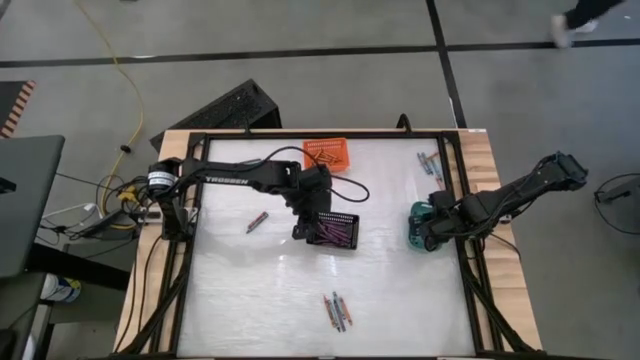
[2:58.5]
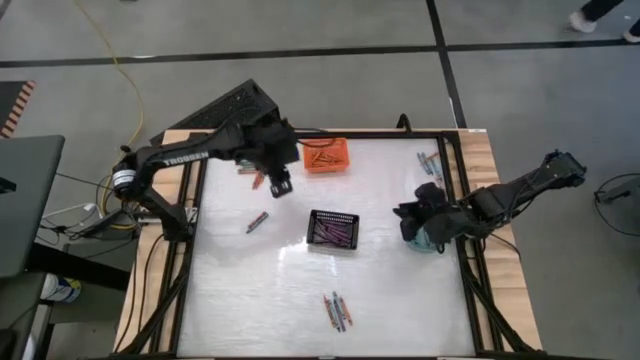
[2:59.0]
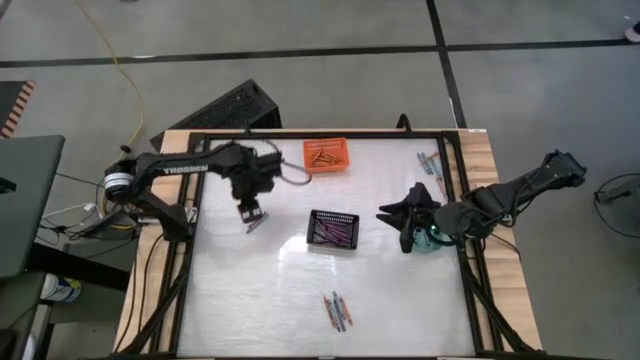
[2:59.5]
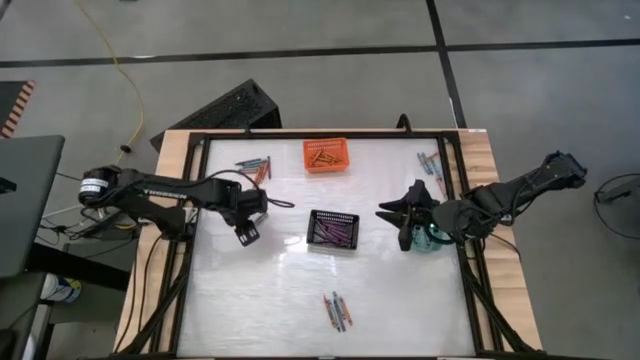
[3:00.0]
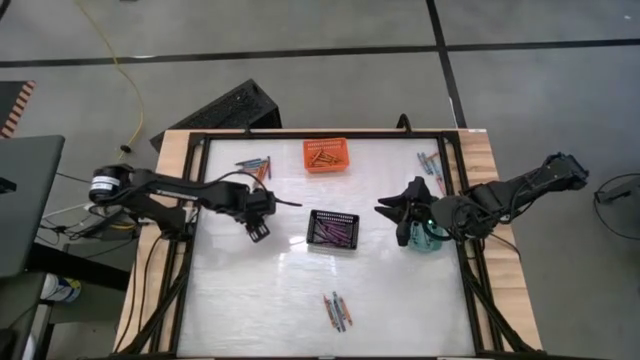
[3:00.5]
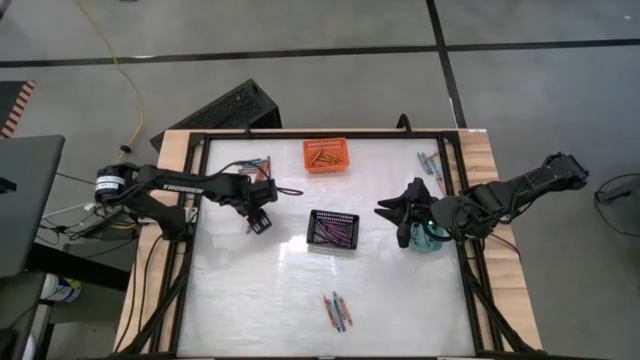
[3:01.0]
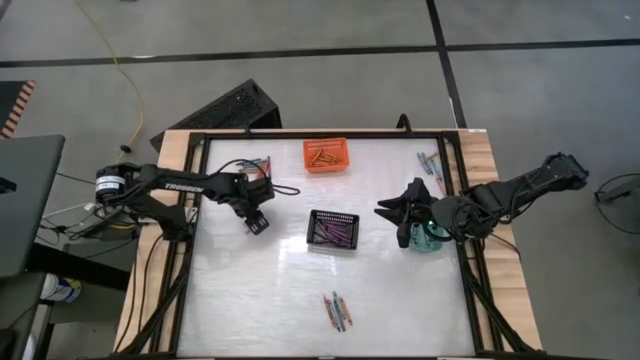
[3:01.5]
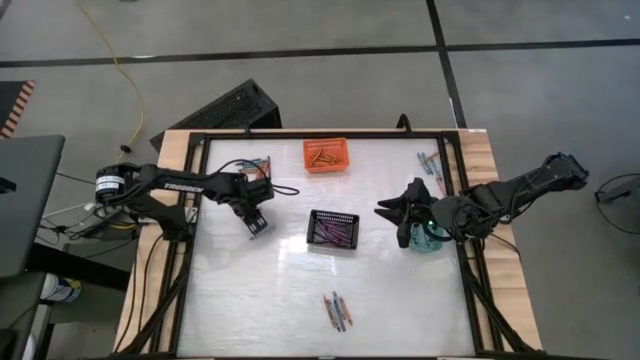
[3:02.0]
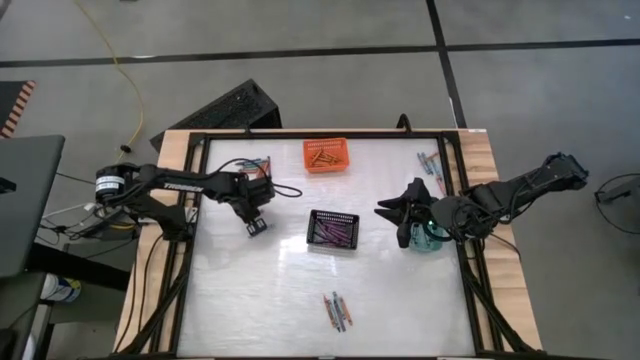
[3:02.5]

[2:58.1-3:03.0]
Task: Sort crayons
Put the orange crayon into the orange bin

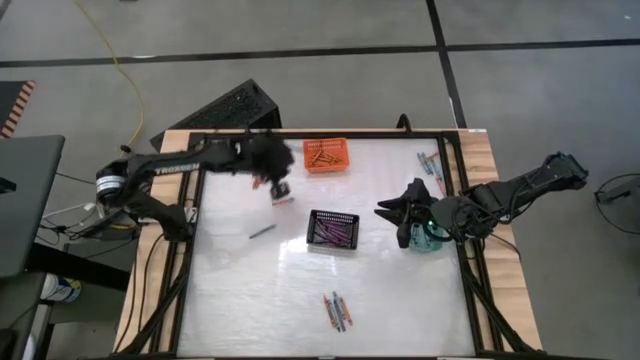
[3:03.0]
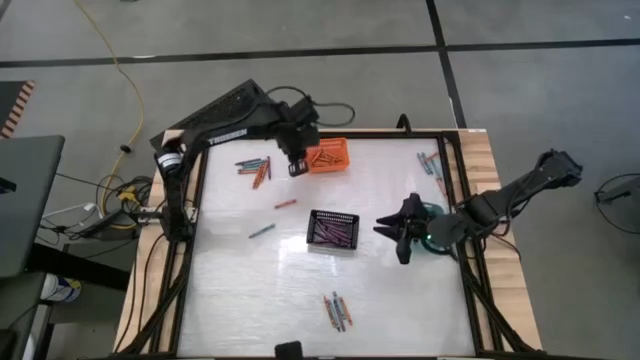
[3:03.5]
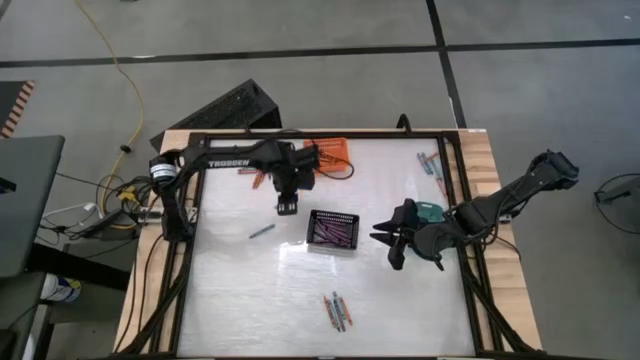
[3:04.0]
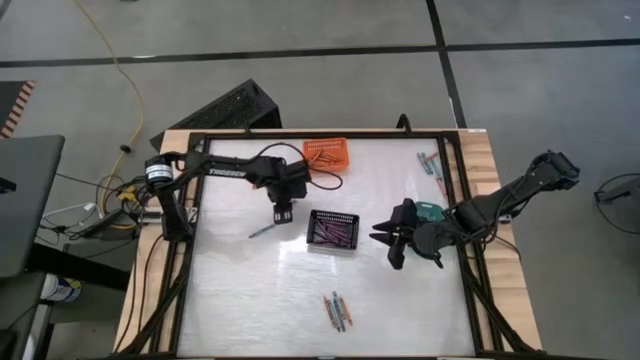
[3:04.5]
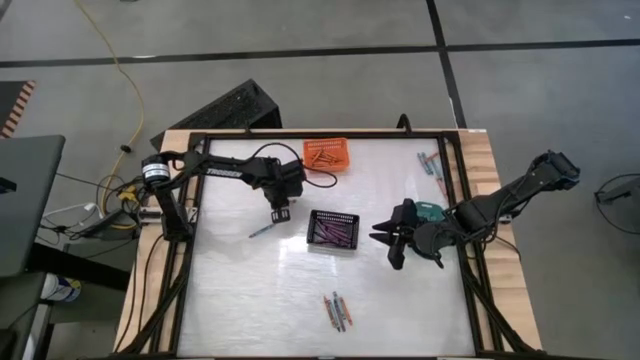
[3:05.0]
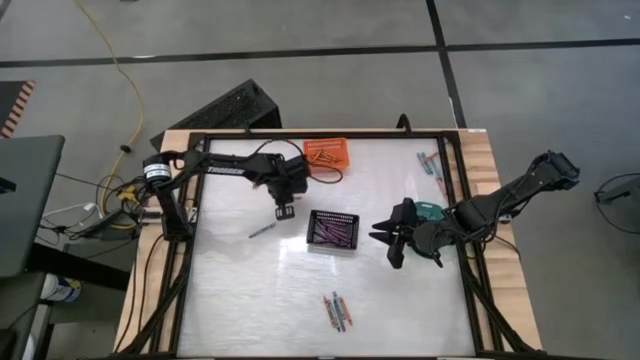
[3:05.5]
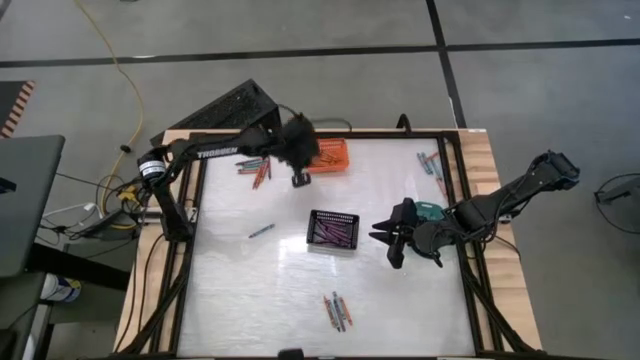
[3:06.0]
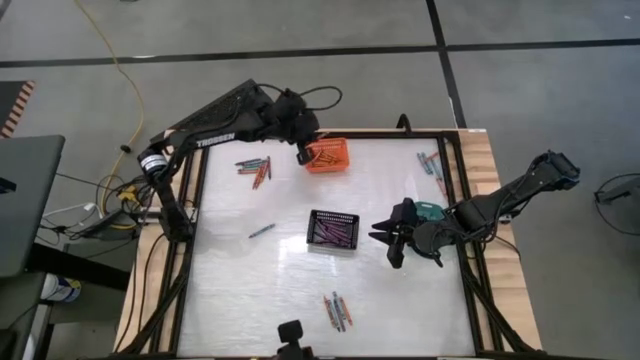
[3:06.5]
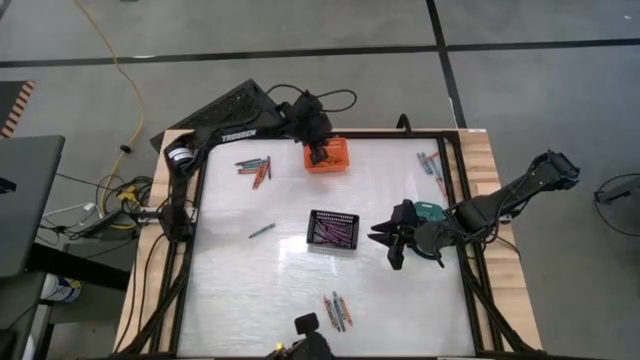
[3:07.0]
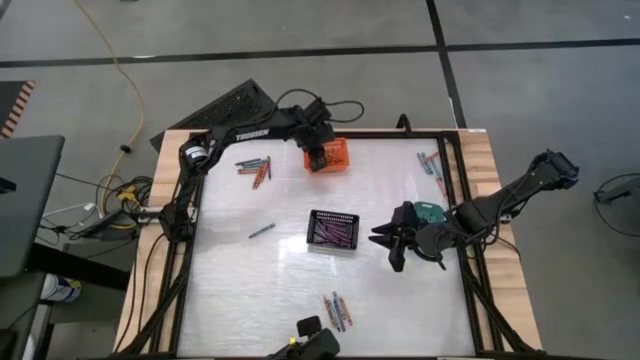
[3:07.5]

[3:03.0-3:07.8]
Put the orange crayon into the orange bin

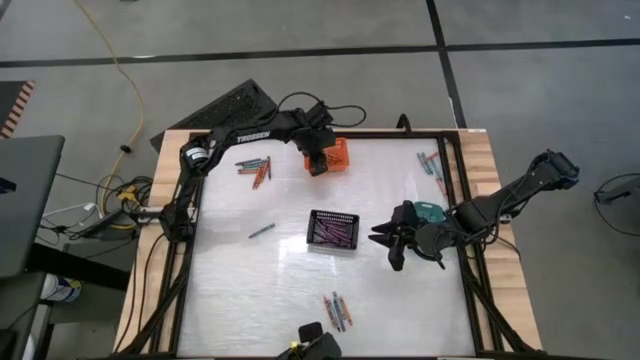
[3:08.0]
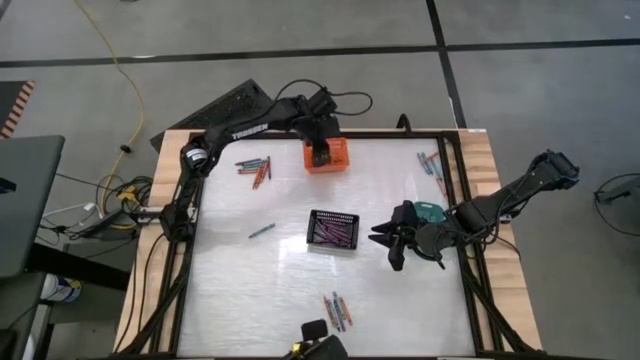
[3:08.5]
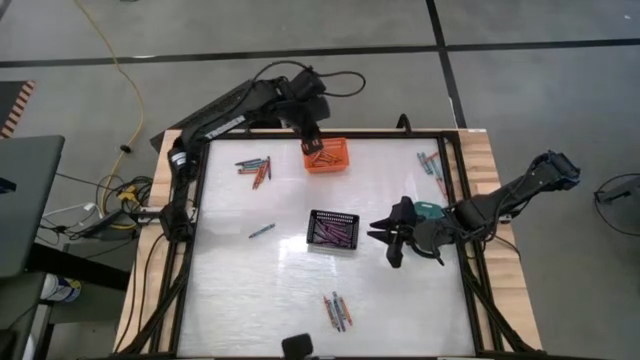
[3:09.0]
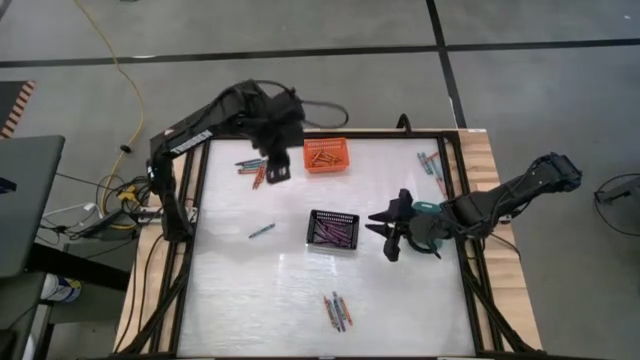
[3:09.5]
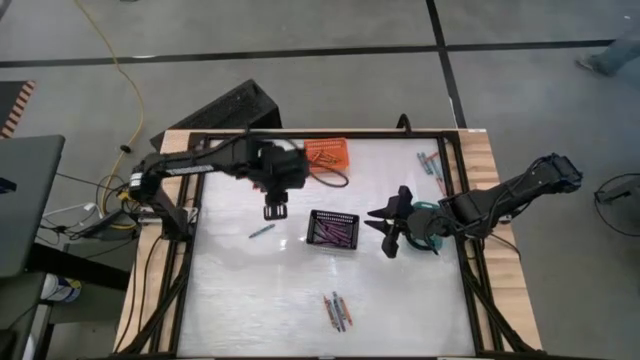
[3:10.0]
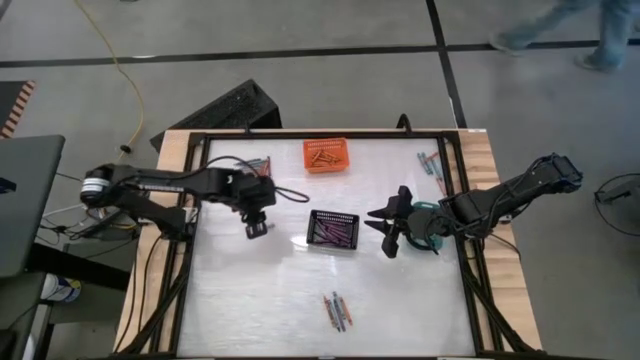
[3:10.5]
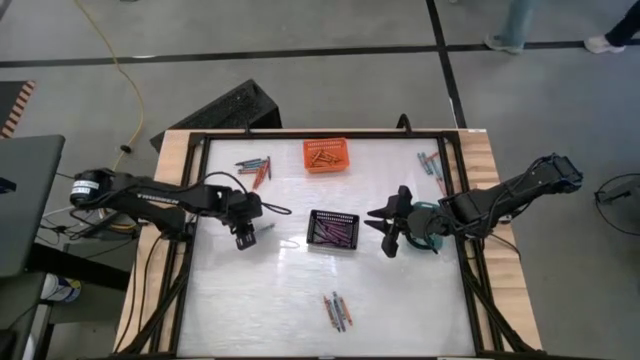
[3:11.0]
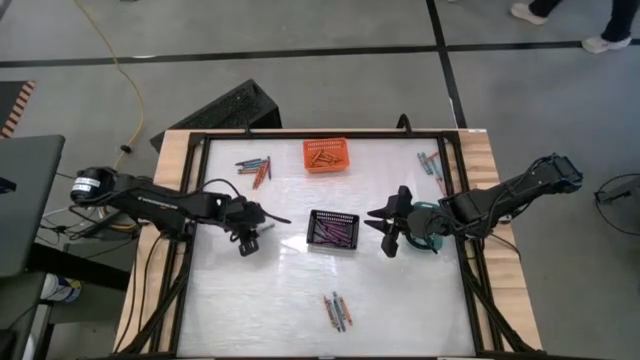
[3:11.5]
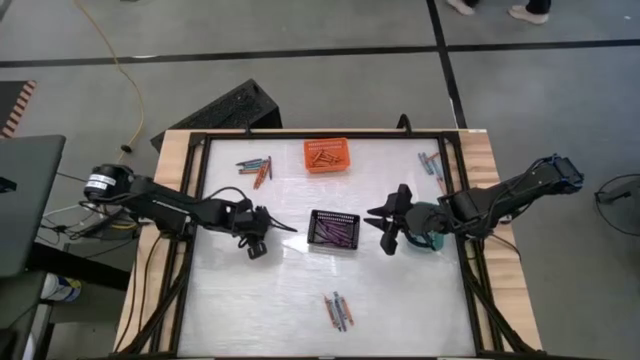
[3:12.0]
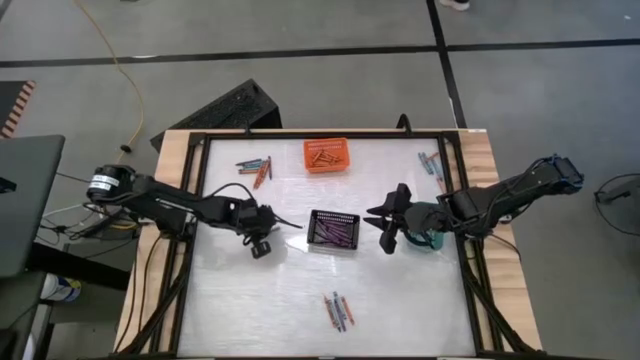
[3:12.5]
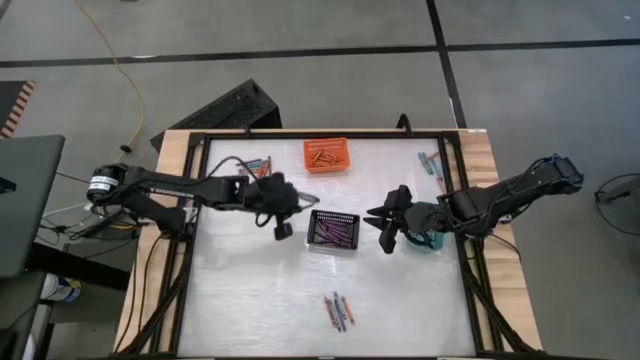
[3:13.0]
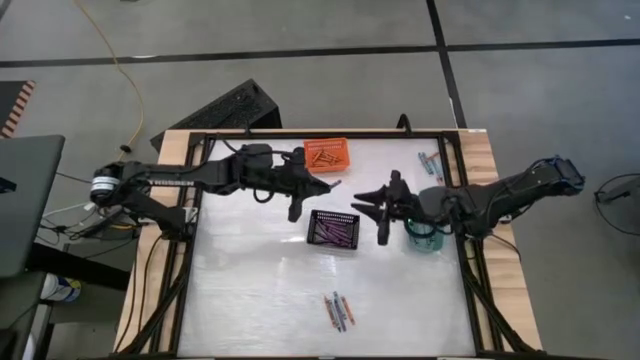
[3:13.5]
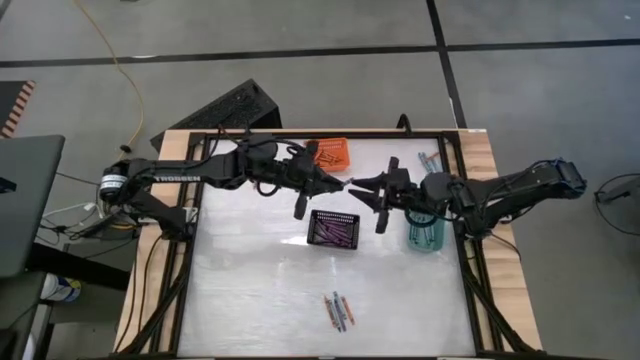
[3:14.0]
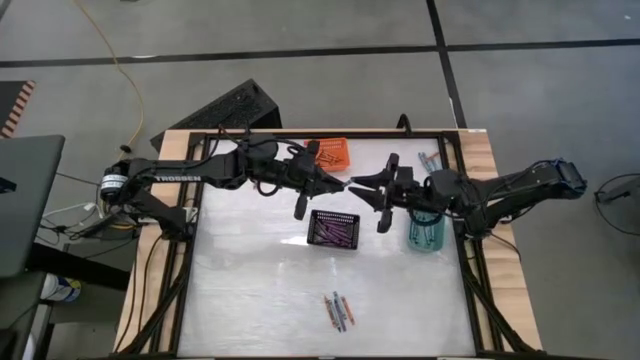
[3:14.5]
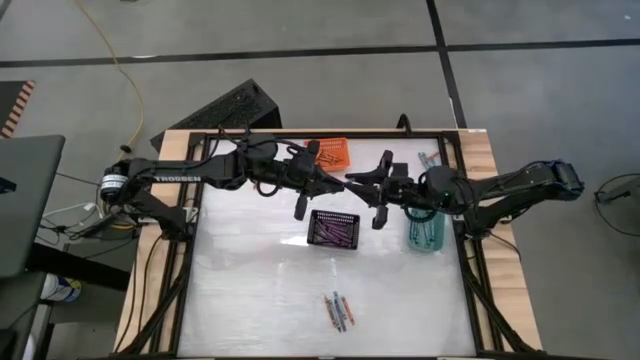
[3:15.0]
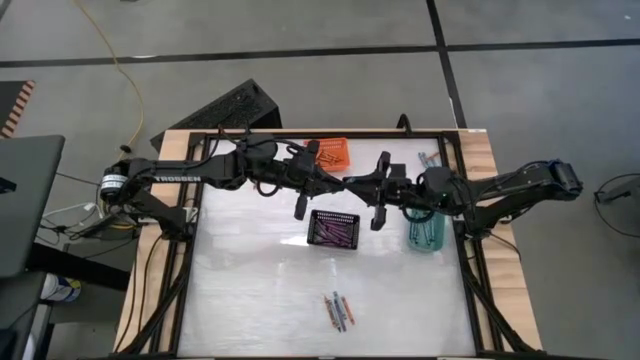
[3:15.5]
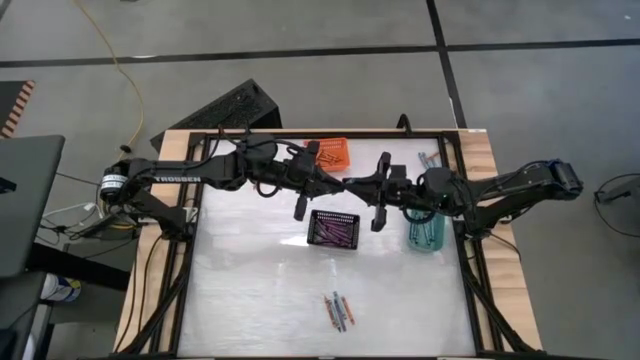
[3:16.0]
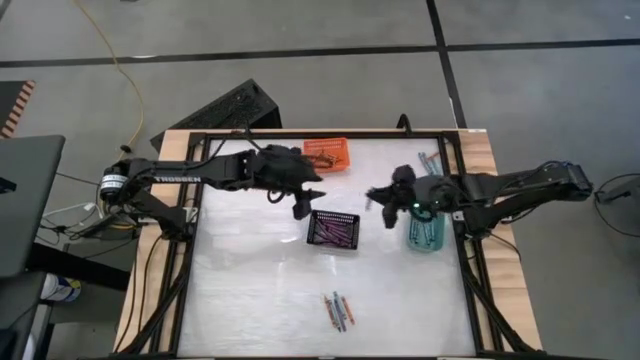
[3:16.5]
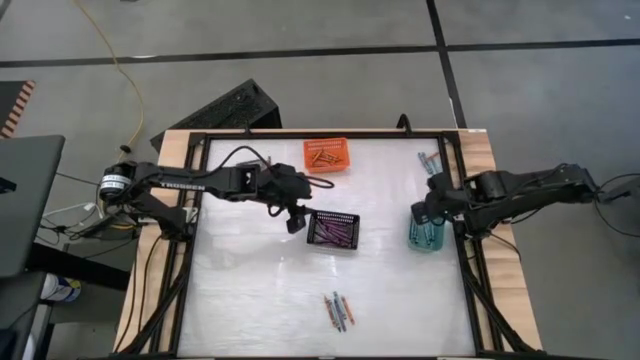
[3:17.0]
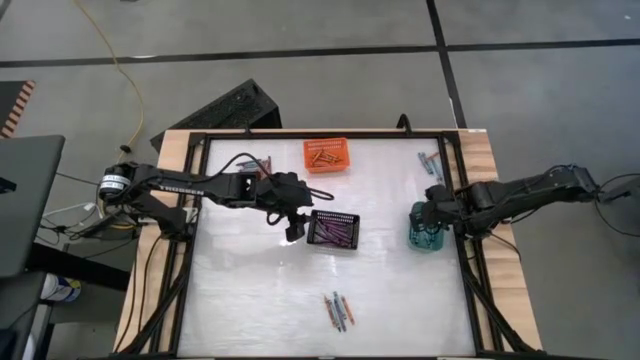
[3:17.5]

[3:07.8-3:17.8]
Put the light blue green crayon into the green bin

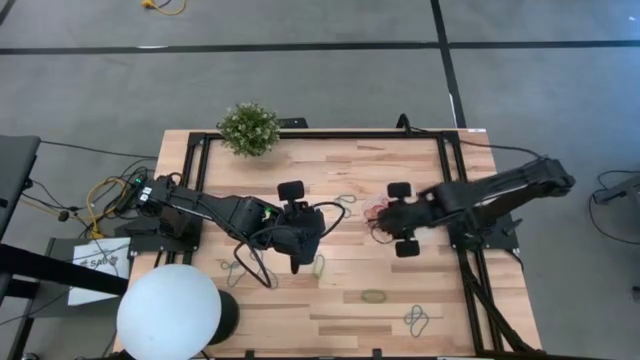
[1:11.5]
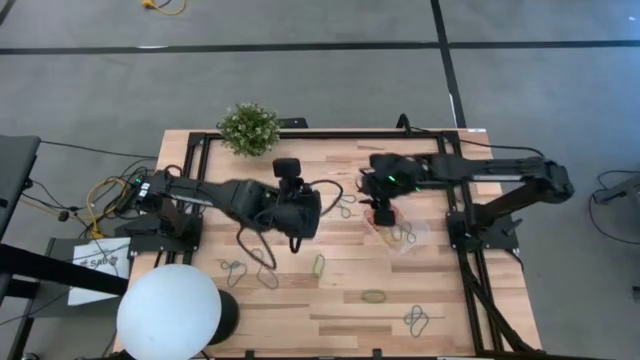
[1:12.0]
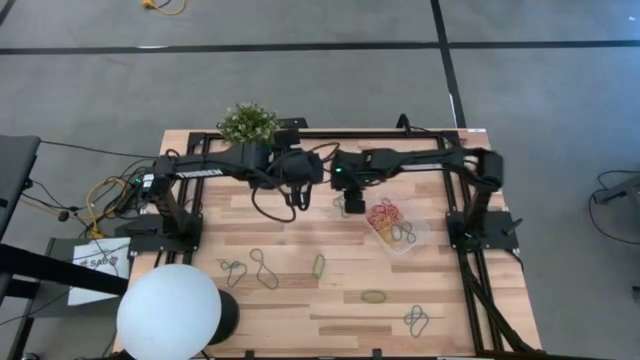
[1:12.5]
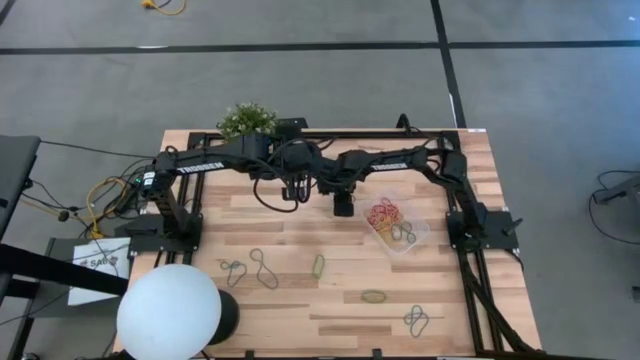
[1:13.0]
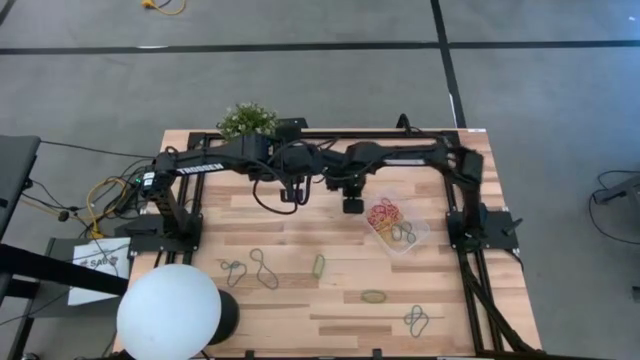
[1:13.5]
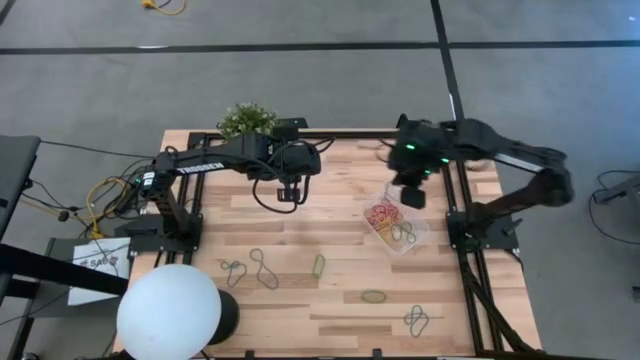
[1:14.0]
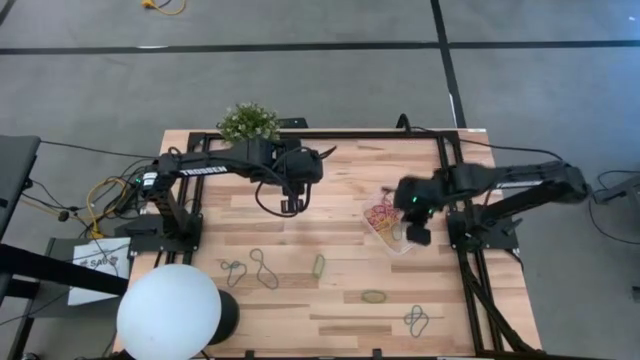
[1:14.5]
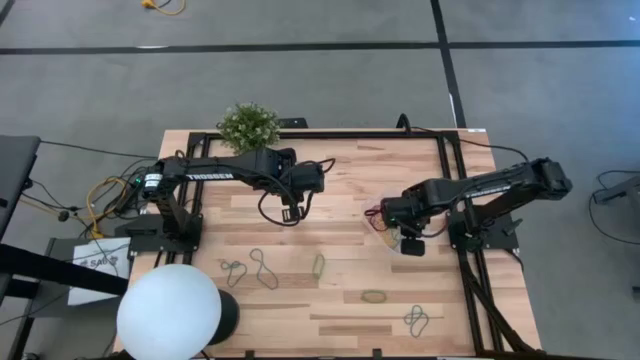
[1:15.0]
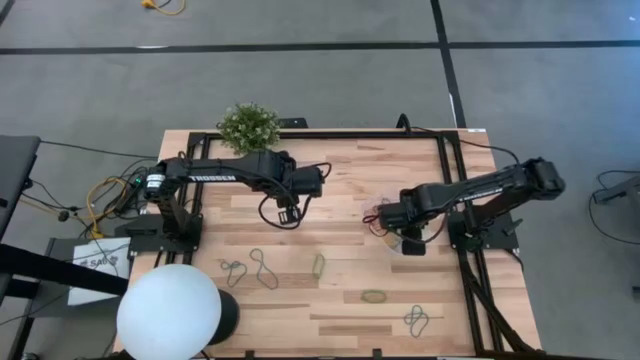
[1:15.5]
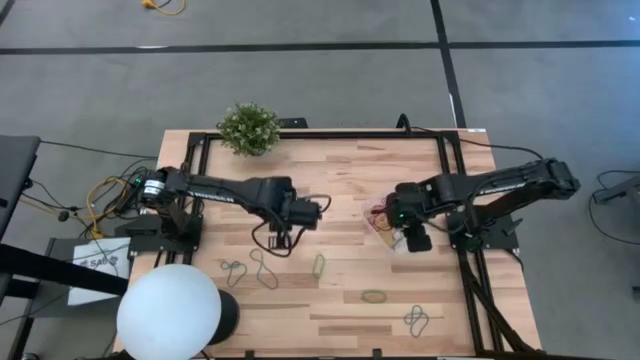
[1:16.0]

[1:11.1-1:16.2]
Task: Pick and place items into bin
Put the blue rubber band into the transparent bin
